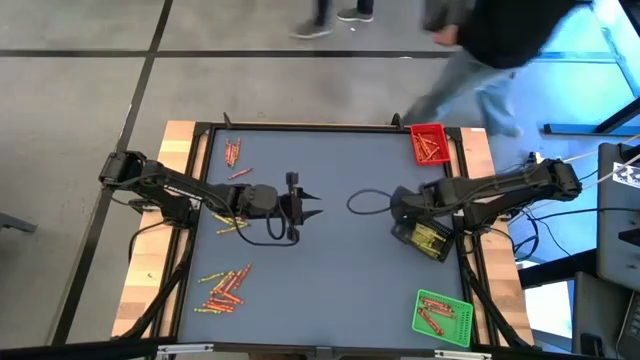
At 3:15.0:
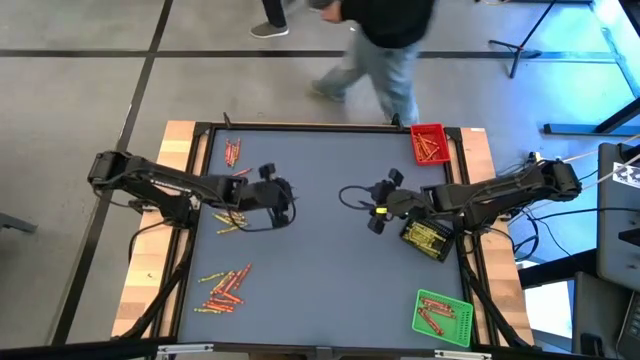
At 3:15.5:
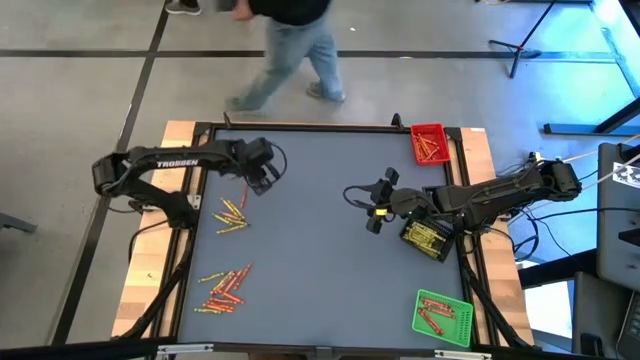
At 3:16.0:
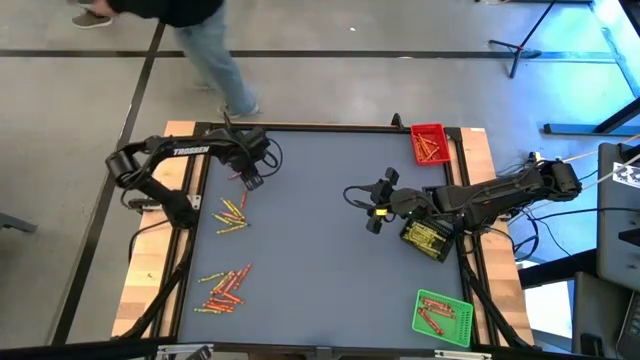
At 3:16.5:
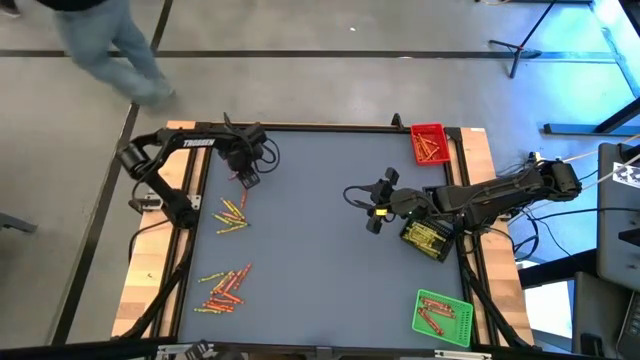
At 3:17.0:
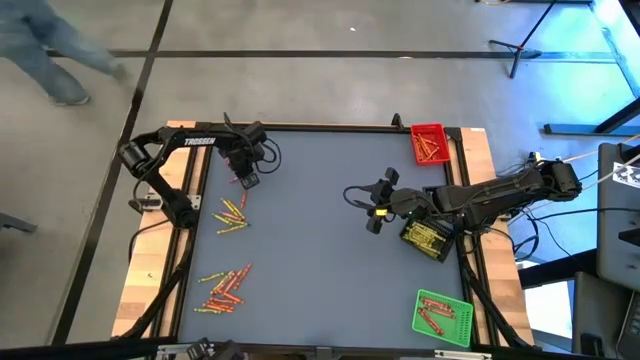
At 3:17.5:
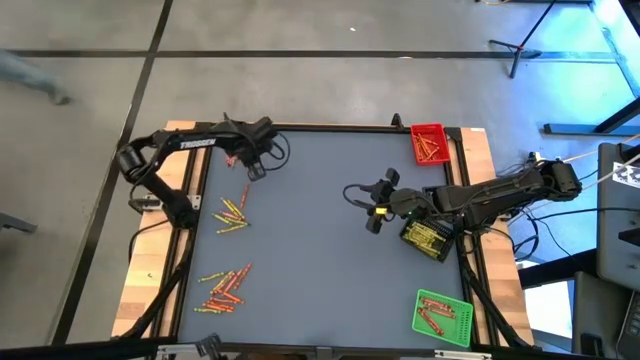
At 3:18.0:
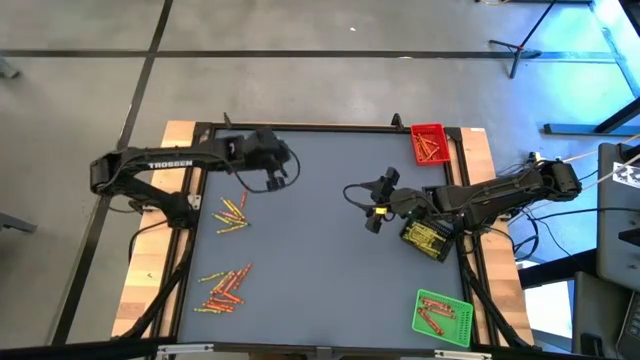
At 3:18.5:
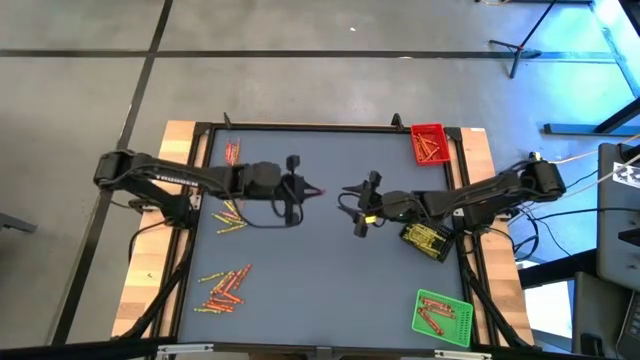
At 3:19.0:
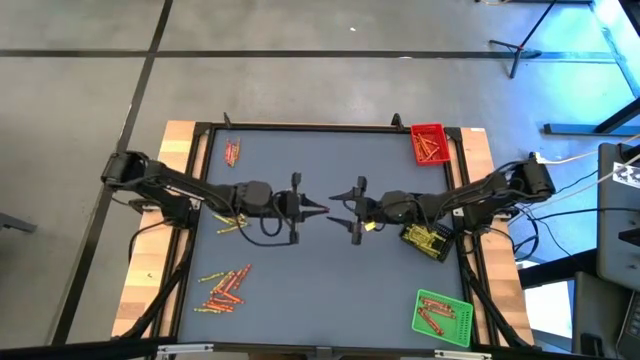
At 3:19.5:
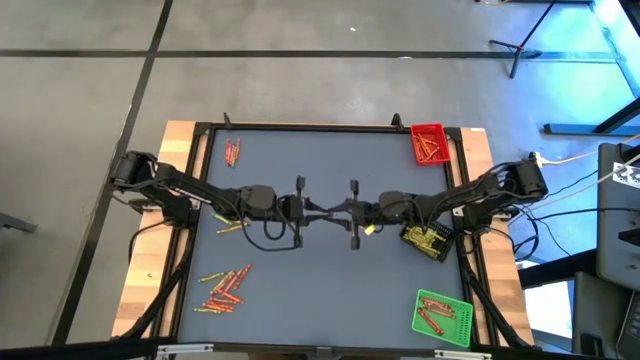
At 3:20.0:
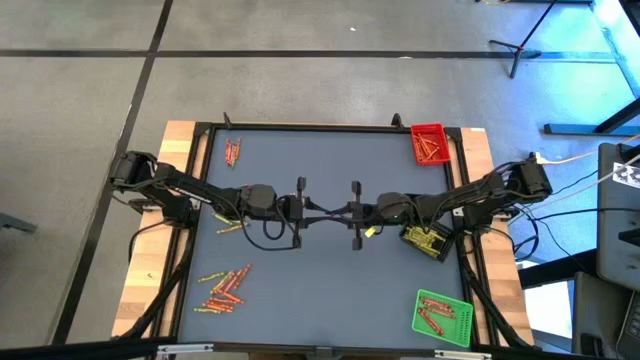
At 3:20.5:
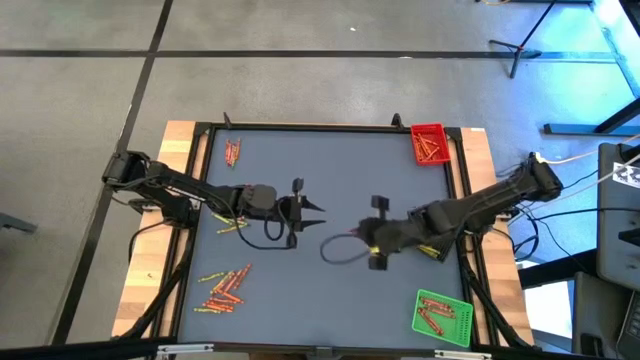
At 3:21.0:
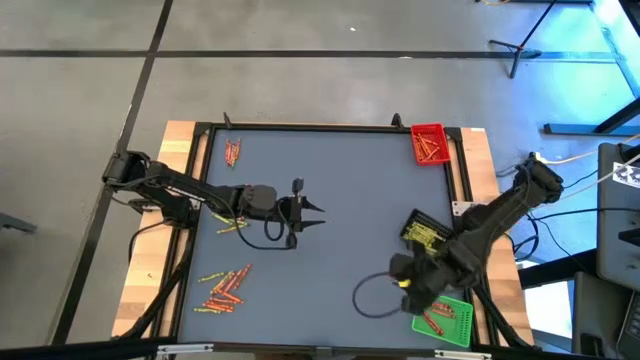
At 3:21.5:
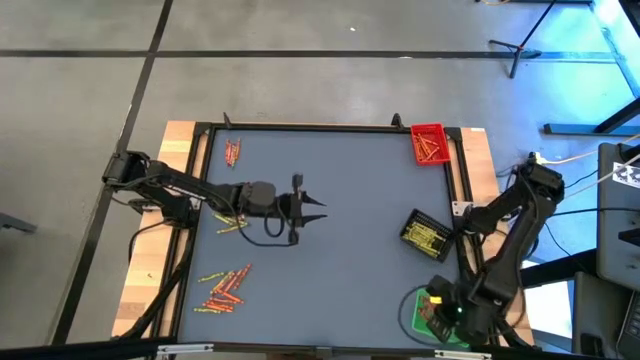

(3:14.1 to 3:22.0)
Task: Sort crayons
Put the red crayon into the green basket

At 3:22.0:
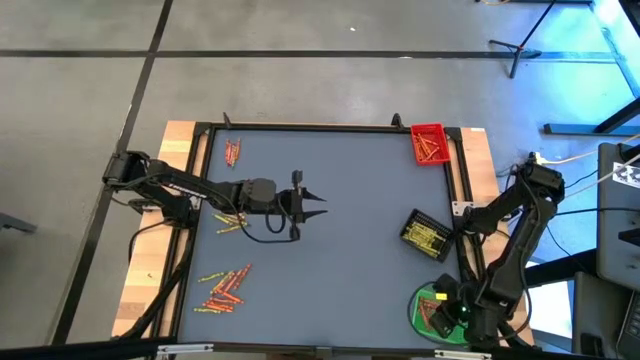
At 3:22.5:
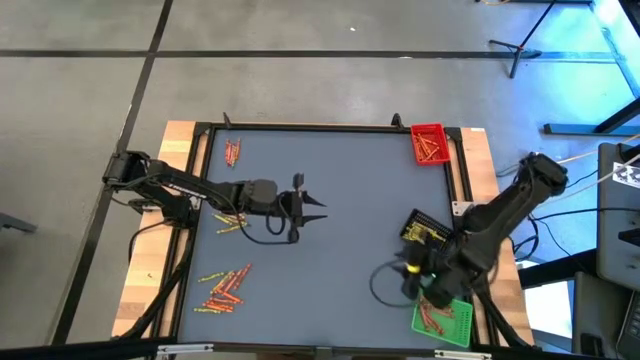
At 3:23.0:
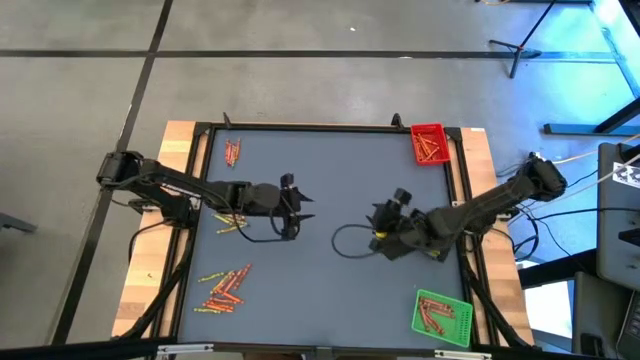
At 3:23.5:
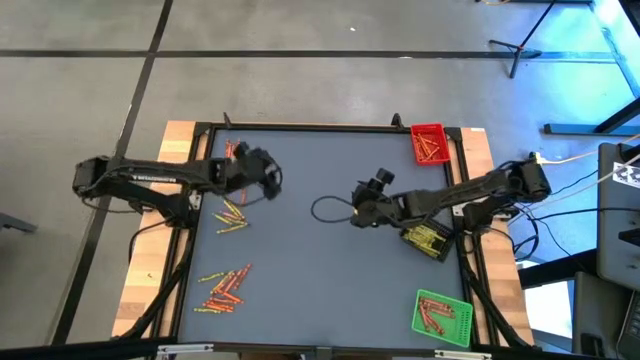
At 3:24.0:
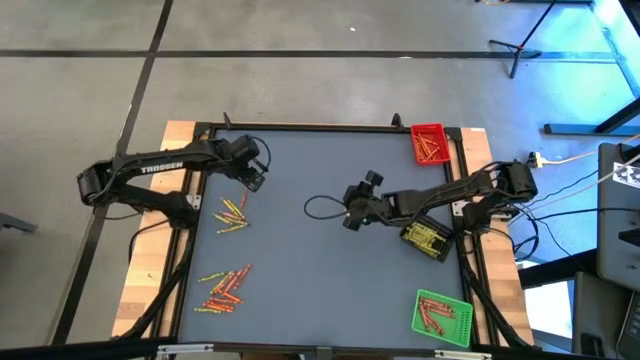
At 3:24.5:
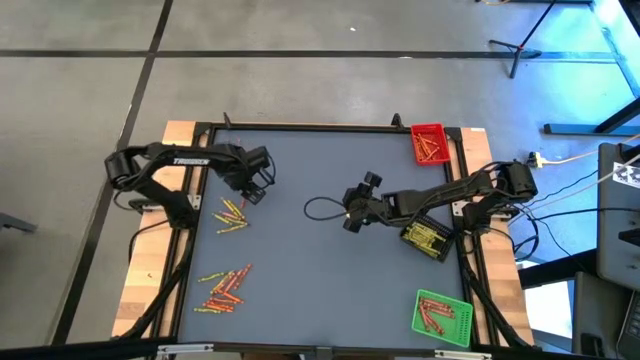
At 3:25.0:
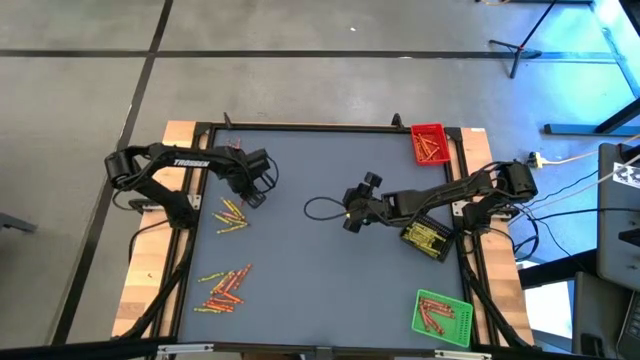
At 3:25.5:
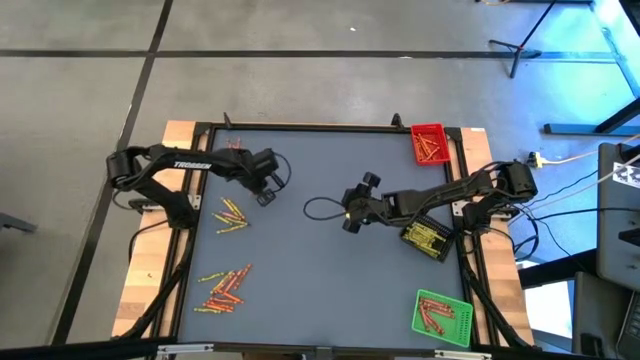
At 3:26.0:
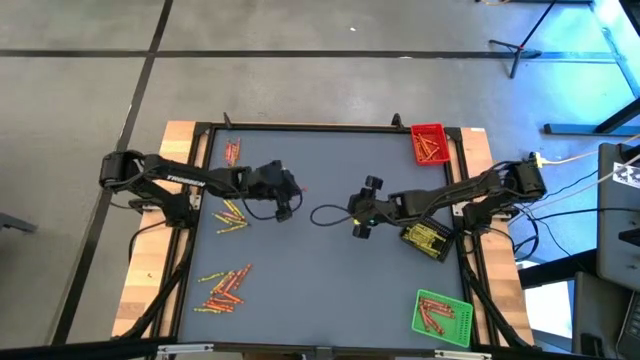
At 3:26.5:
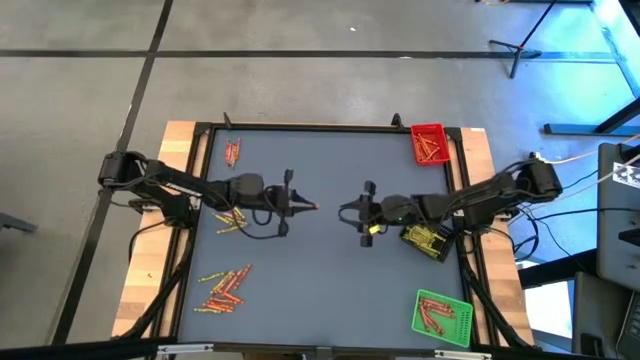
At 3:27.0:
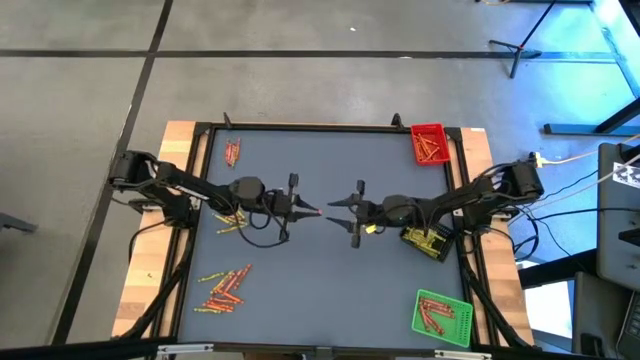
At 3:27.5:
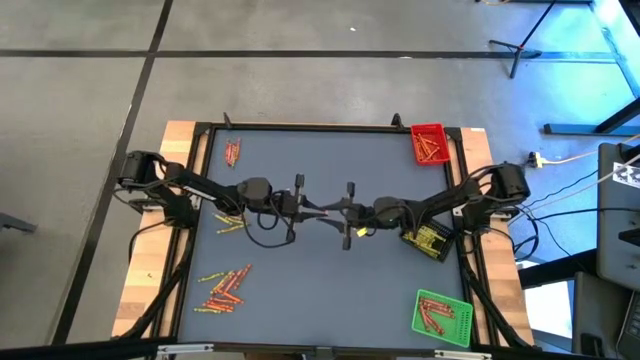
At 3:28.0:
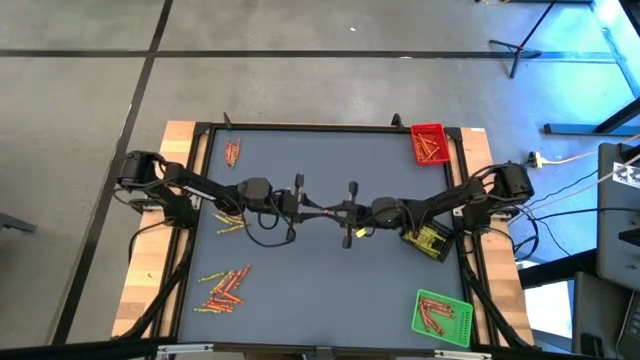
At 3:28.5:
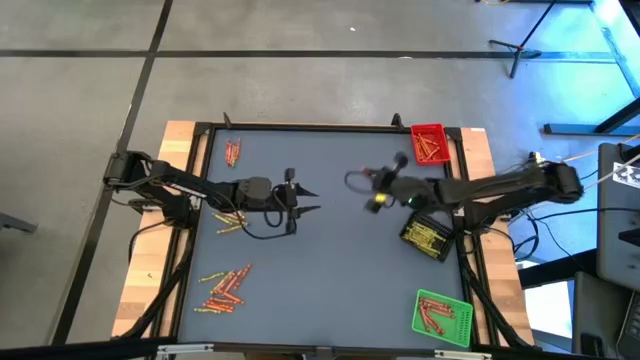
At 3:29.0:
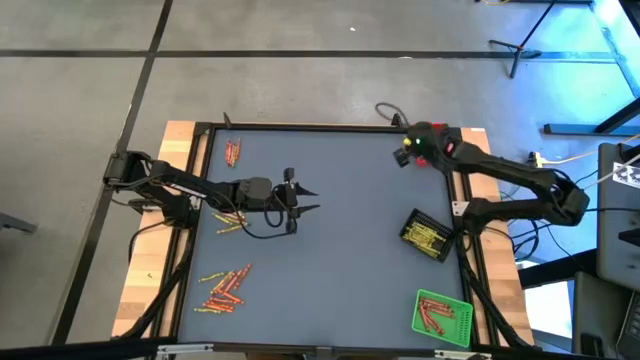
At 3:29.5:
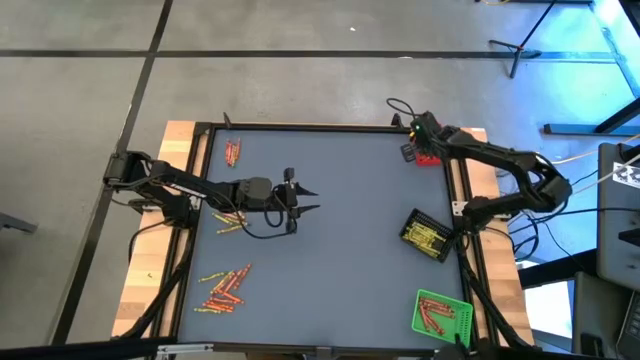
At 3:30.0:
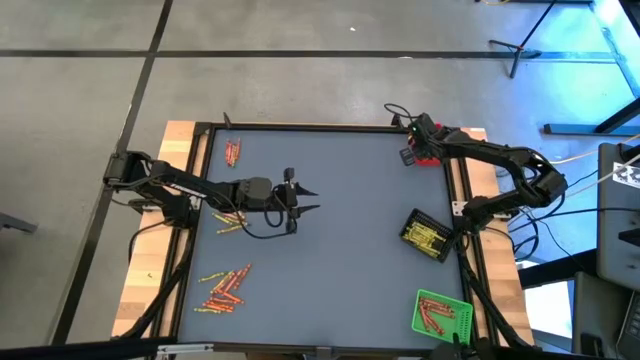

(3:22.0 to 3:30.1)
Put the orange crayon into the red basket

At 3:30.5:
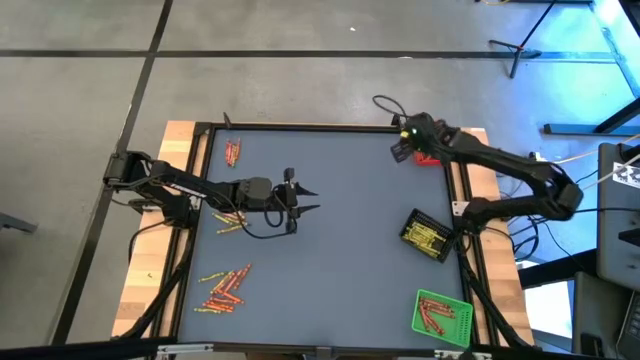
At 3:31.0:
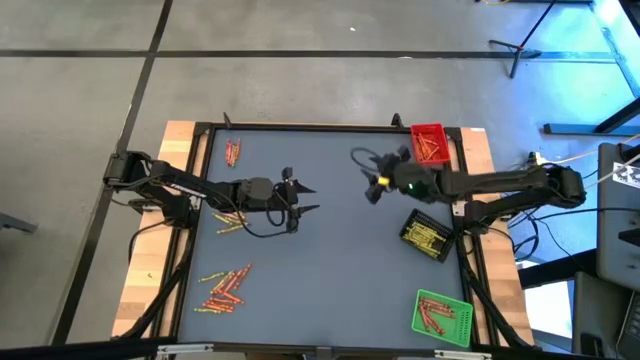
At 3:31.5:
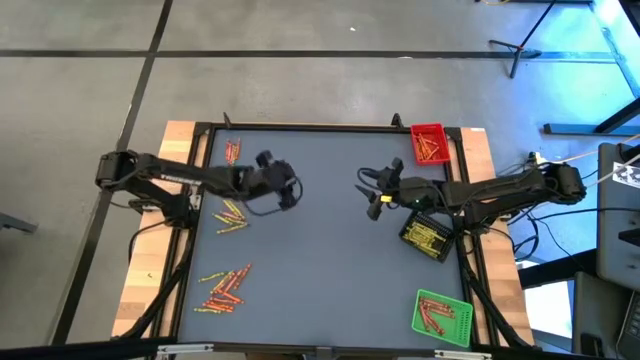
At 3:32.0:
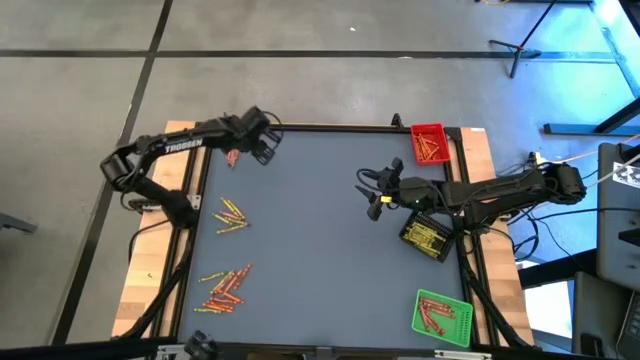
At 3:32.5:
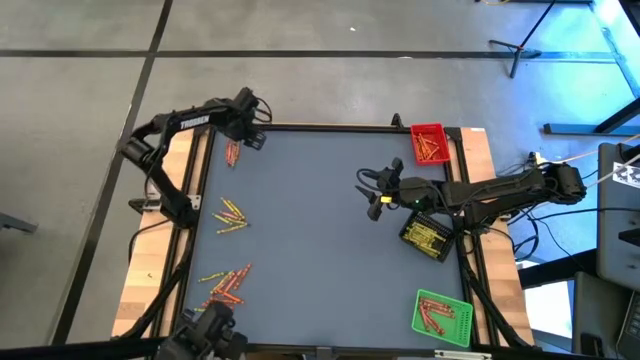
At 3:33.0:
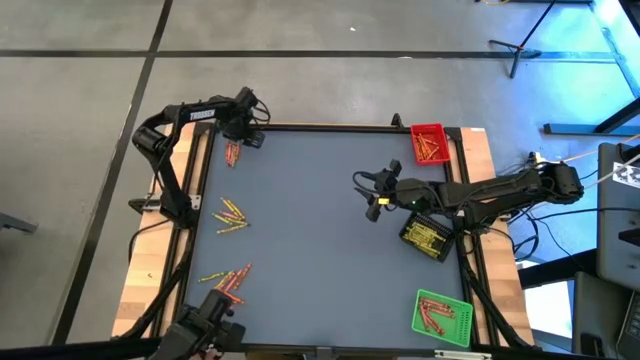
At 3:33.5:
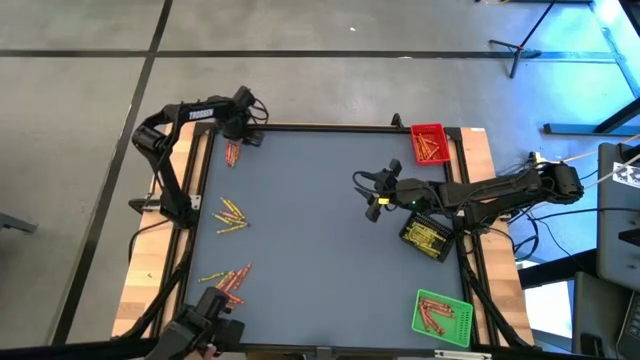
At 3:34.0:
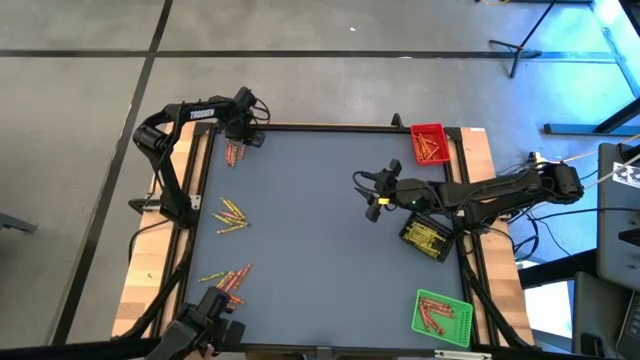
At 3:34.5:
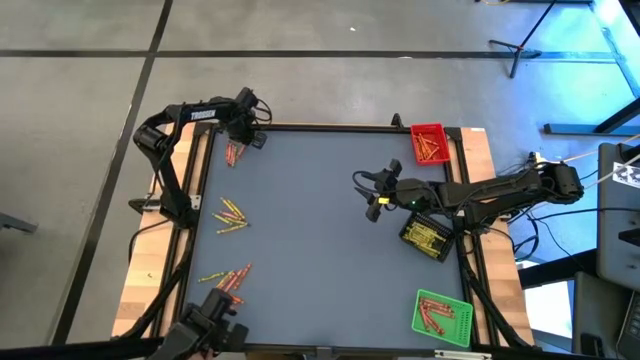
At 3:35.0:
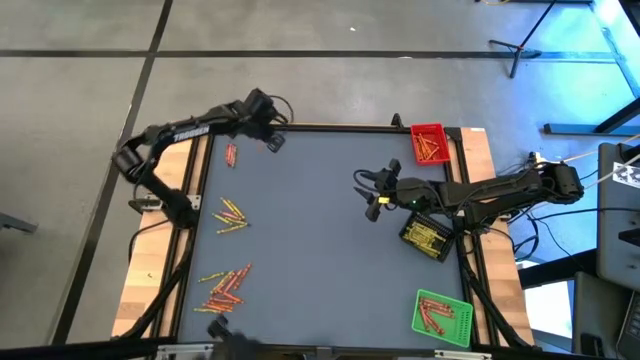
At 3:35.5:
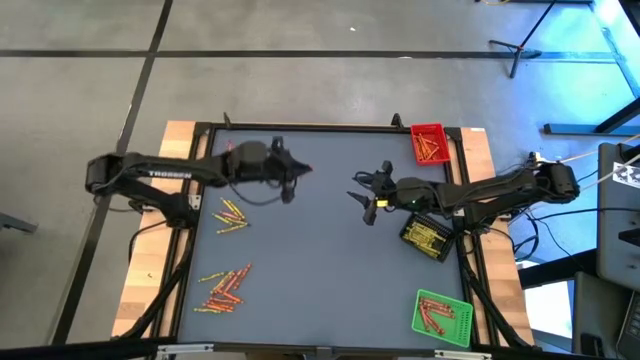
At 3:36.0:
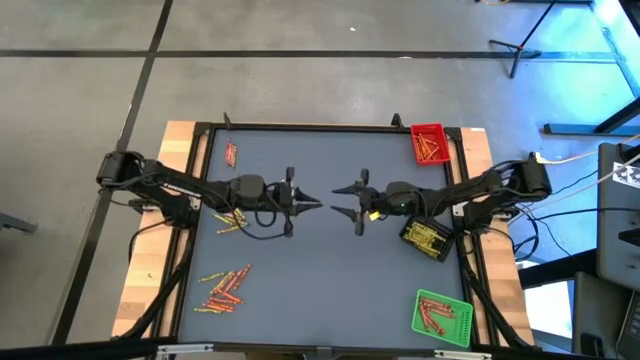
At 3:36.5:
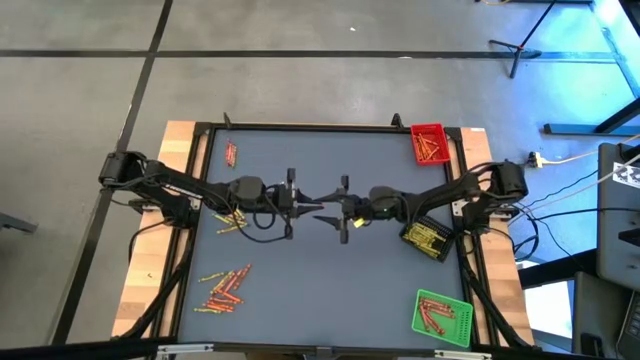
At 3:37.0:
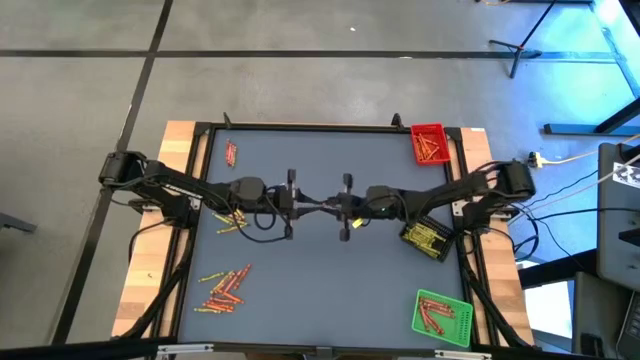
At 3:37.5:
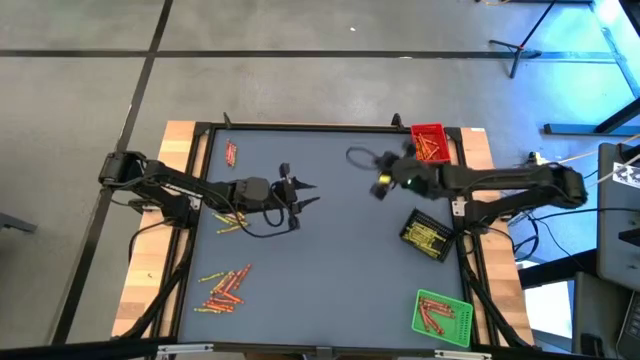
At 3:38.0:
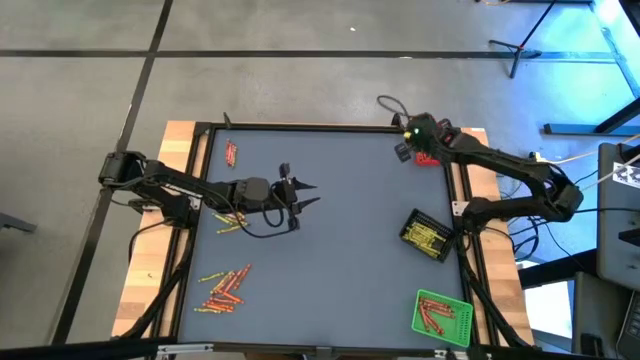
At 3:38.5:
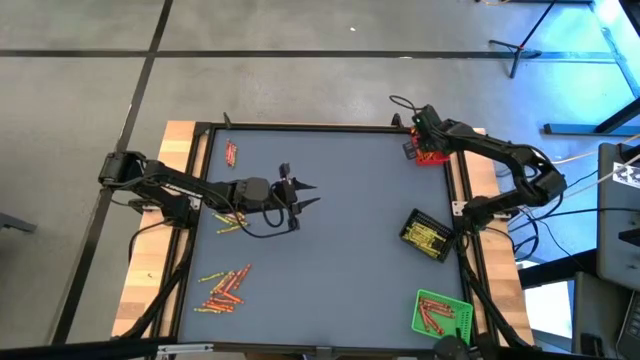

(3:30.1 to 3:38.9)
Put the orange crayon into the red basket
